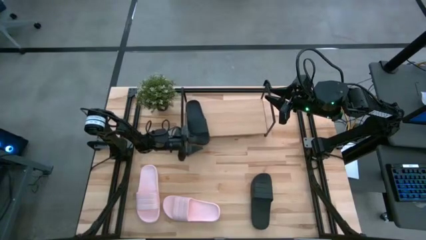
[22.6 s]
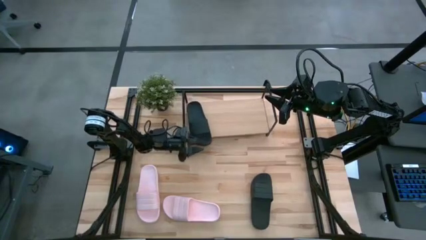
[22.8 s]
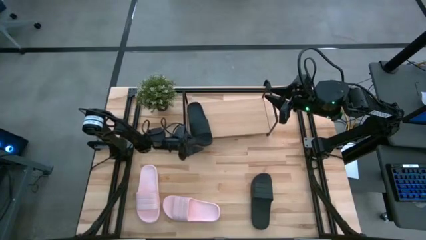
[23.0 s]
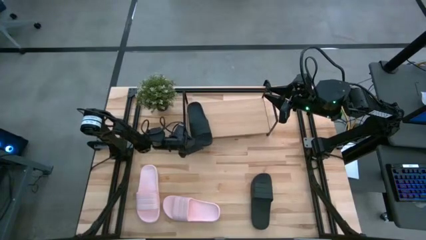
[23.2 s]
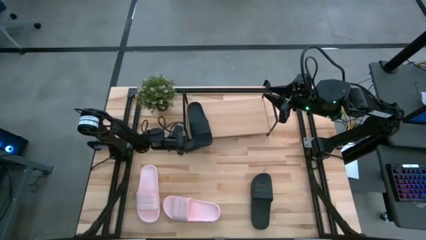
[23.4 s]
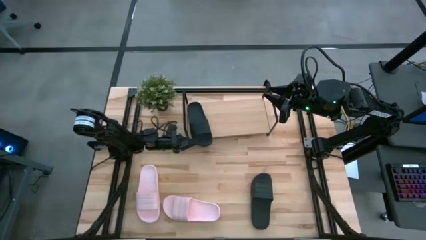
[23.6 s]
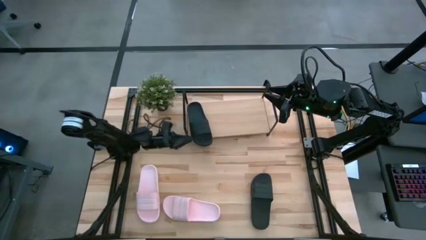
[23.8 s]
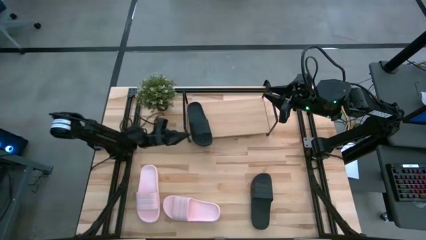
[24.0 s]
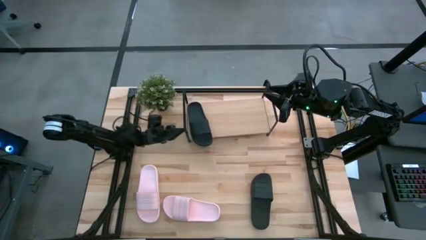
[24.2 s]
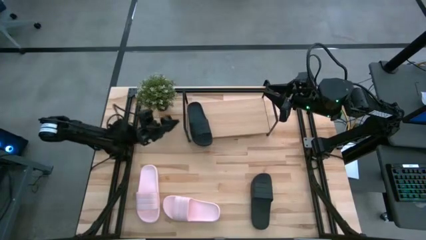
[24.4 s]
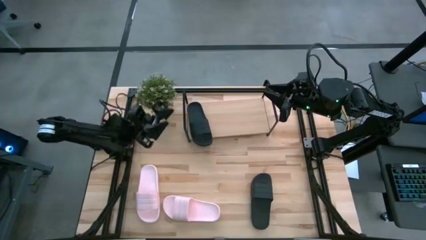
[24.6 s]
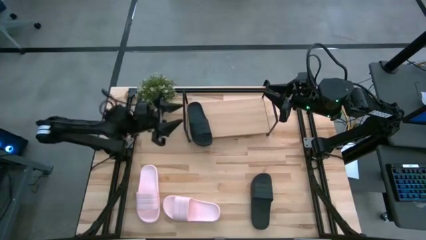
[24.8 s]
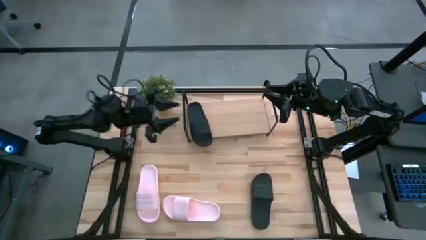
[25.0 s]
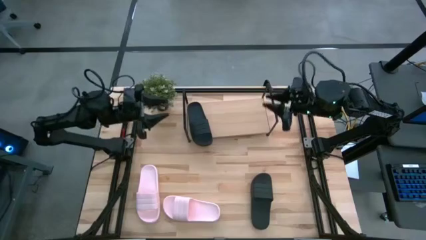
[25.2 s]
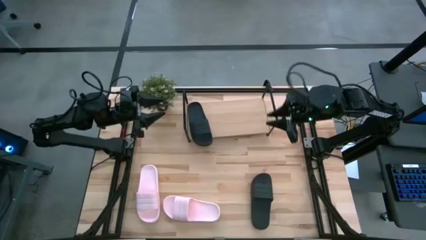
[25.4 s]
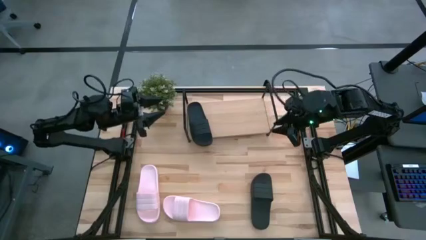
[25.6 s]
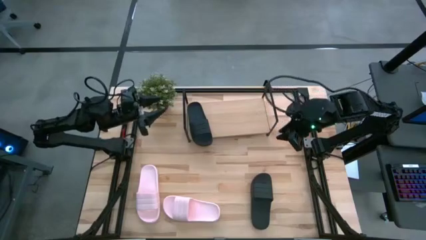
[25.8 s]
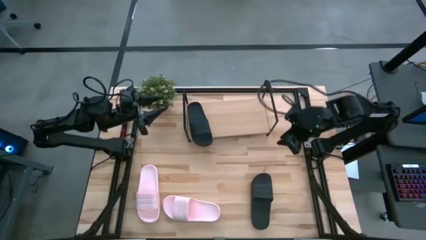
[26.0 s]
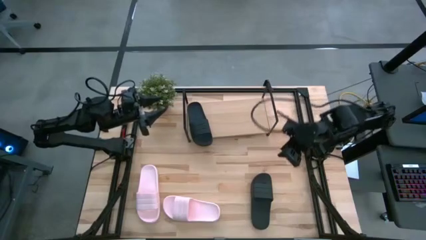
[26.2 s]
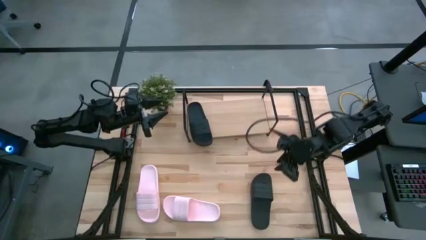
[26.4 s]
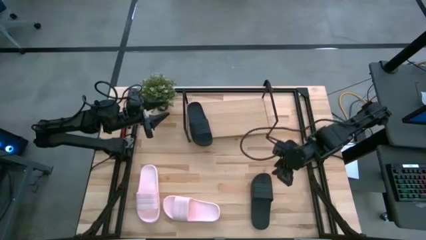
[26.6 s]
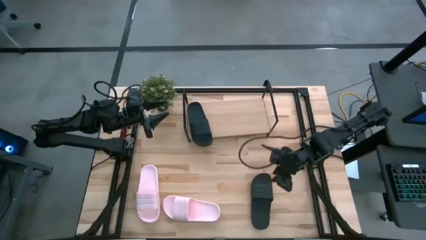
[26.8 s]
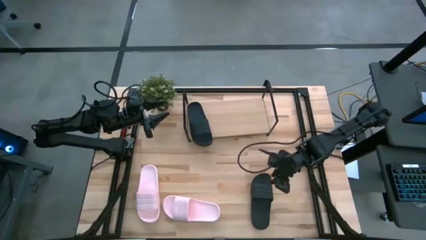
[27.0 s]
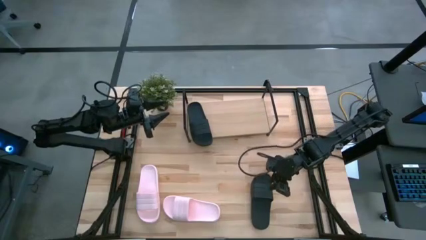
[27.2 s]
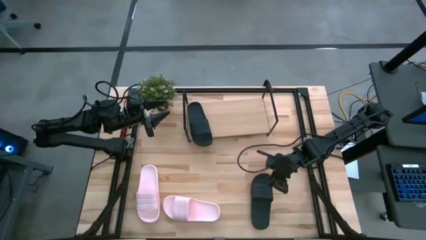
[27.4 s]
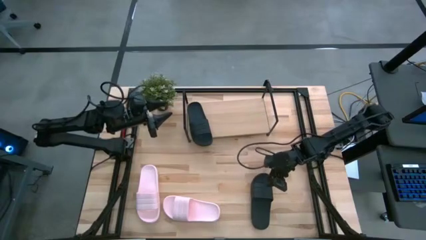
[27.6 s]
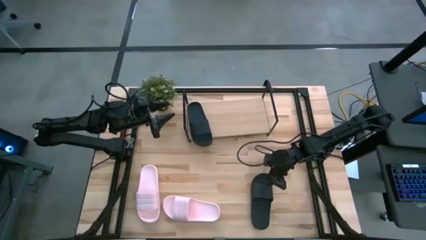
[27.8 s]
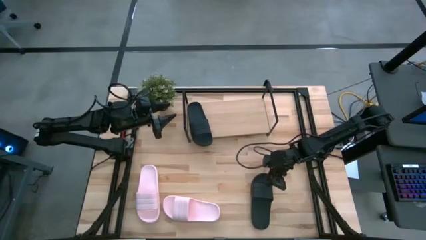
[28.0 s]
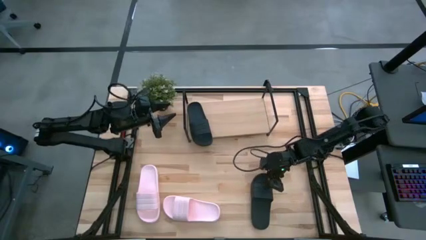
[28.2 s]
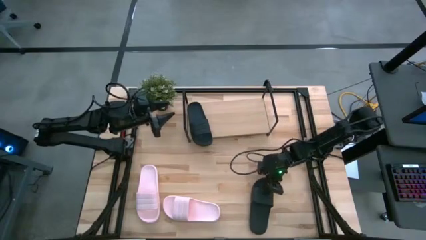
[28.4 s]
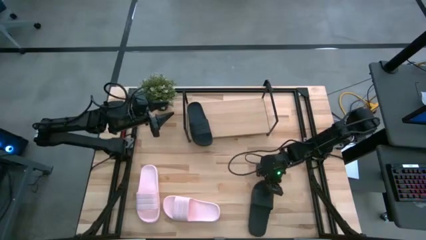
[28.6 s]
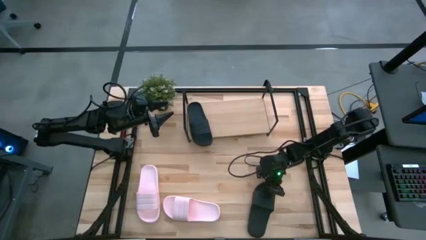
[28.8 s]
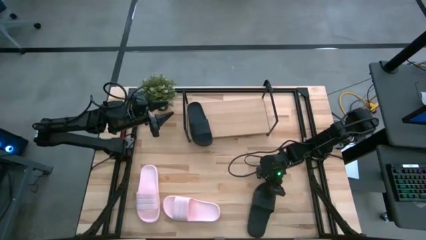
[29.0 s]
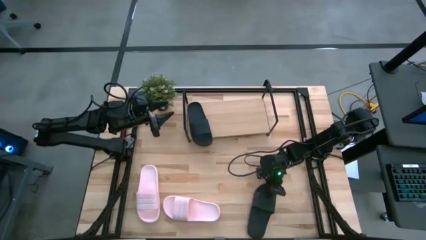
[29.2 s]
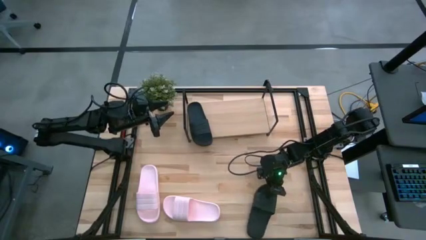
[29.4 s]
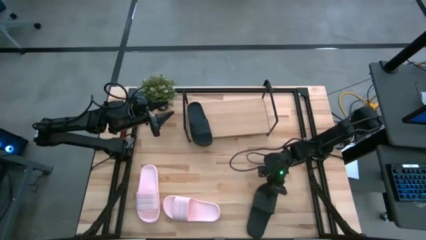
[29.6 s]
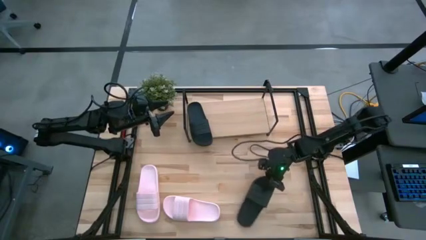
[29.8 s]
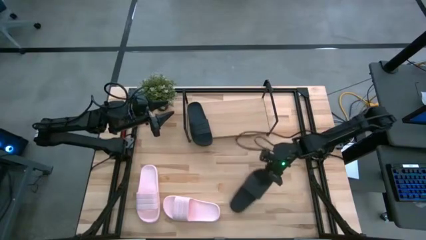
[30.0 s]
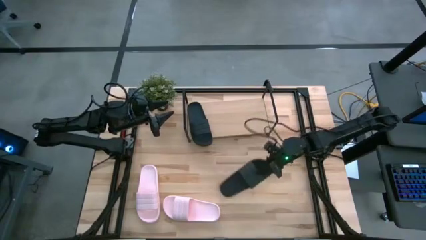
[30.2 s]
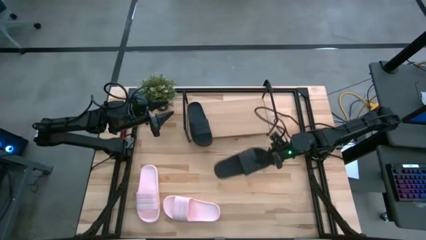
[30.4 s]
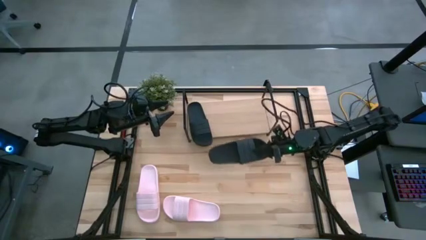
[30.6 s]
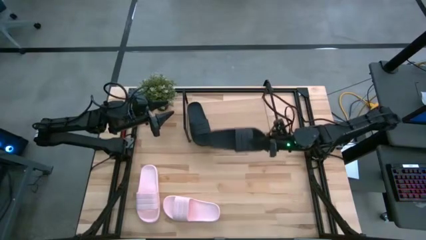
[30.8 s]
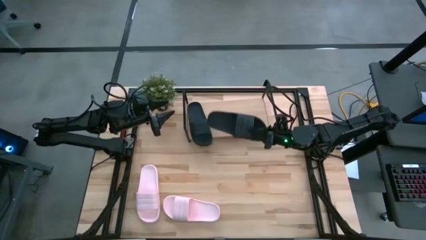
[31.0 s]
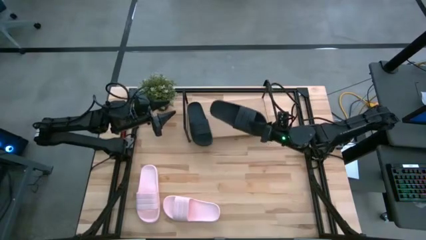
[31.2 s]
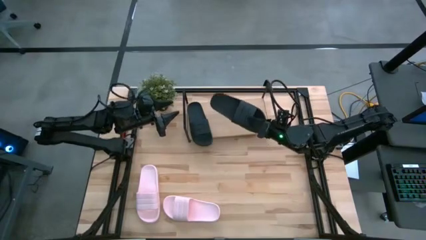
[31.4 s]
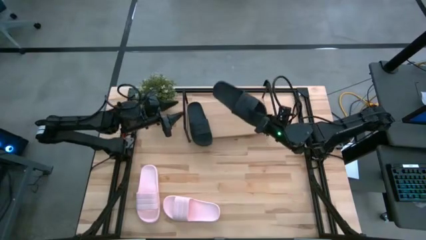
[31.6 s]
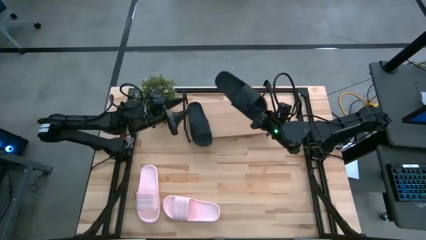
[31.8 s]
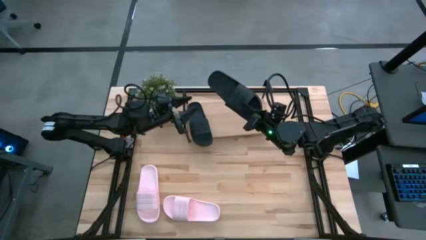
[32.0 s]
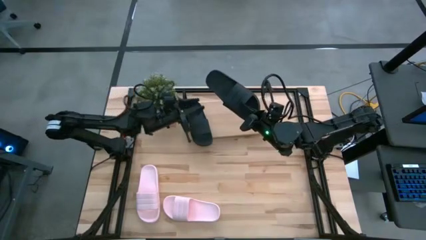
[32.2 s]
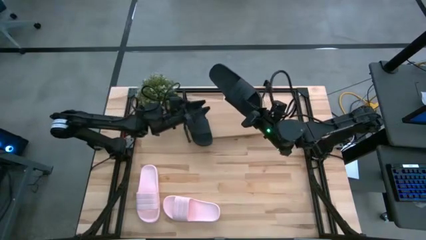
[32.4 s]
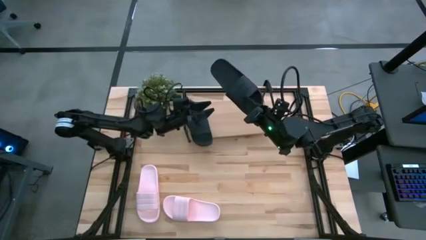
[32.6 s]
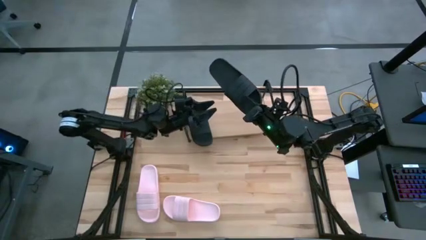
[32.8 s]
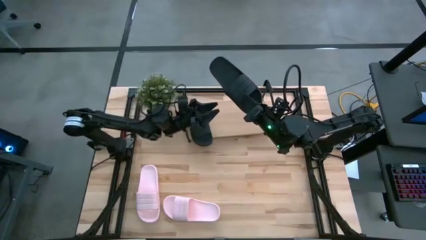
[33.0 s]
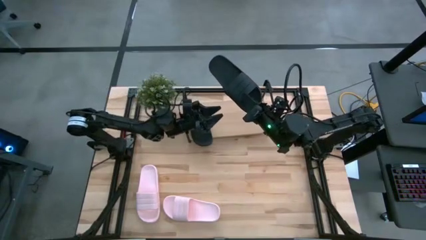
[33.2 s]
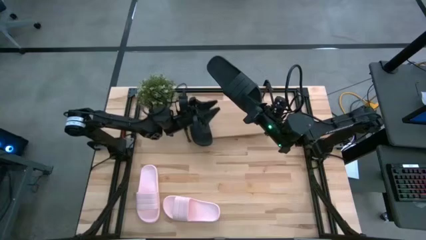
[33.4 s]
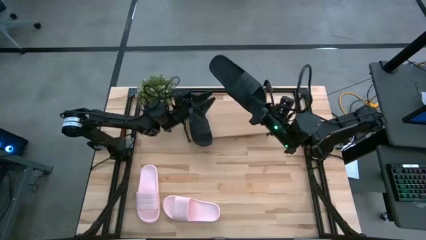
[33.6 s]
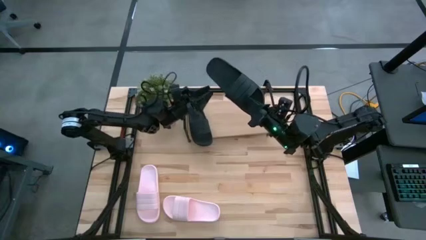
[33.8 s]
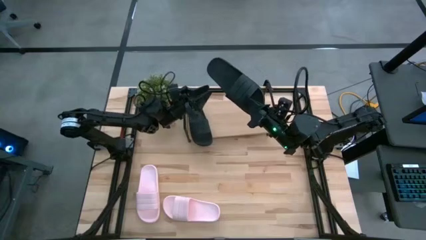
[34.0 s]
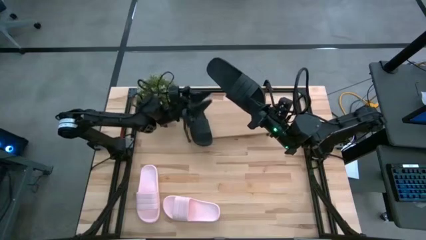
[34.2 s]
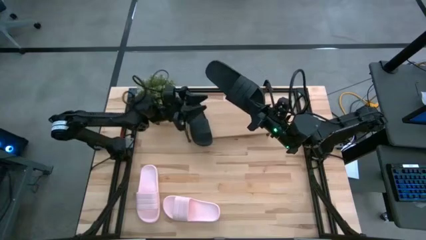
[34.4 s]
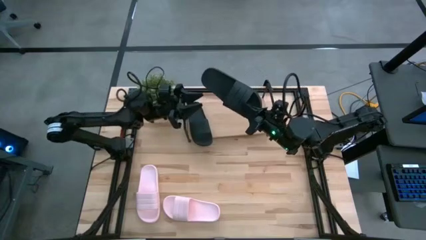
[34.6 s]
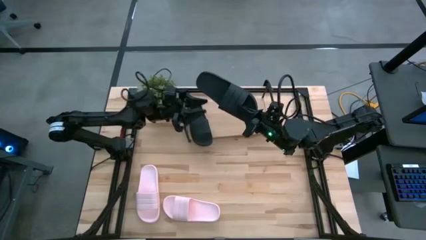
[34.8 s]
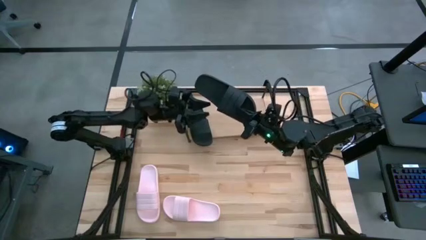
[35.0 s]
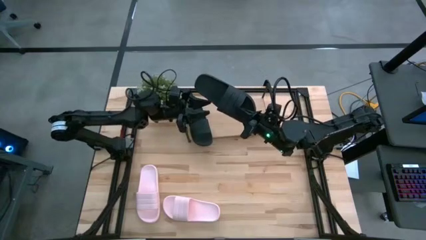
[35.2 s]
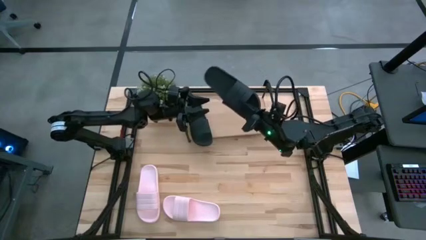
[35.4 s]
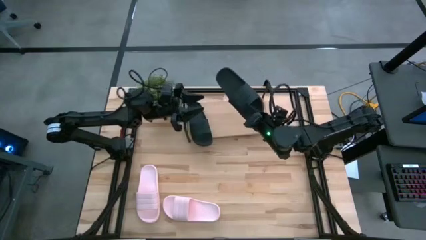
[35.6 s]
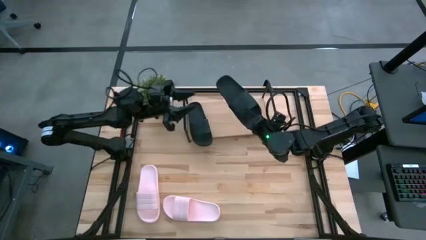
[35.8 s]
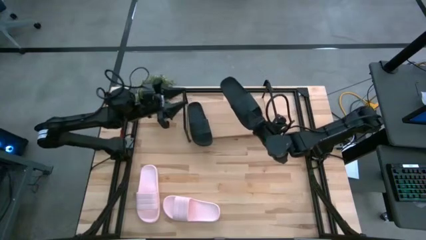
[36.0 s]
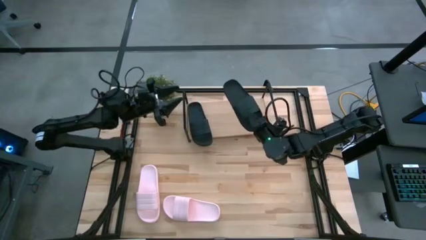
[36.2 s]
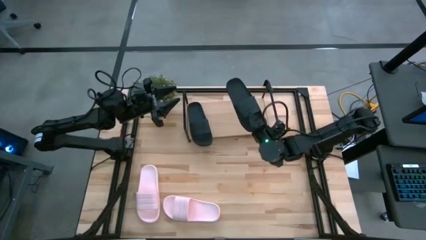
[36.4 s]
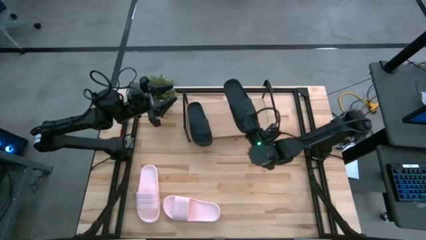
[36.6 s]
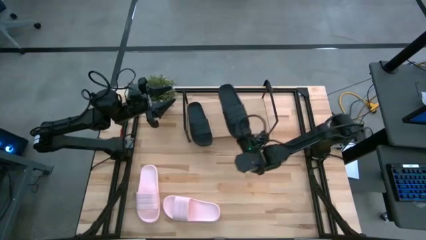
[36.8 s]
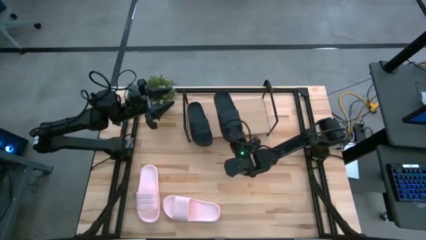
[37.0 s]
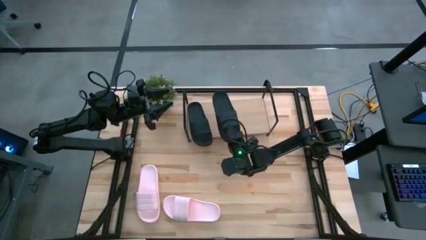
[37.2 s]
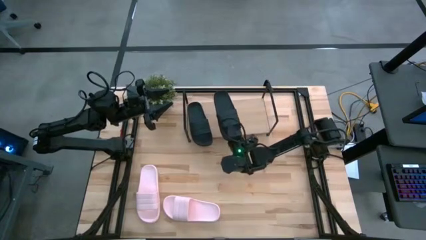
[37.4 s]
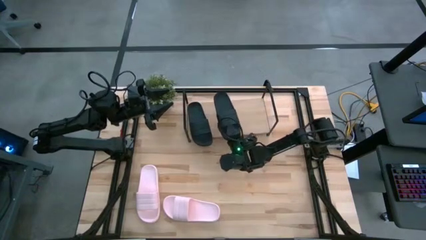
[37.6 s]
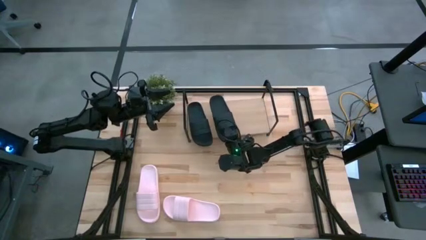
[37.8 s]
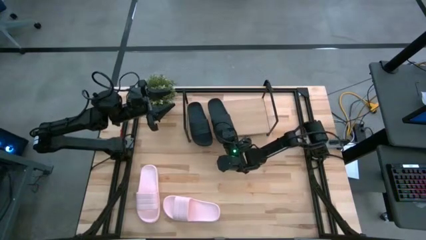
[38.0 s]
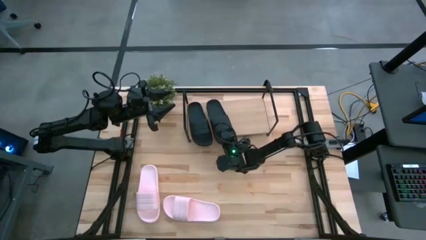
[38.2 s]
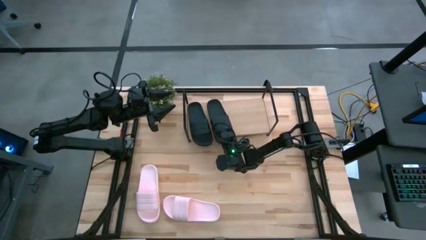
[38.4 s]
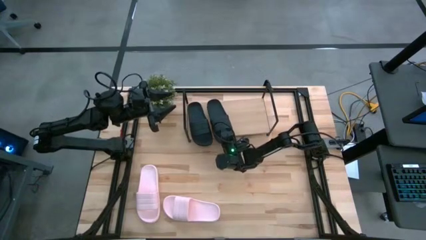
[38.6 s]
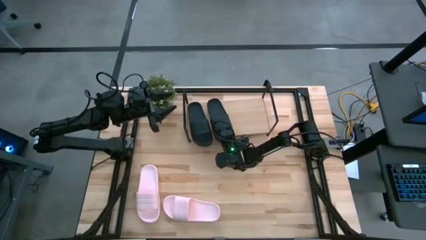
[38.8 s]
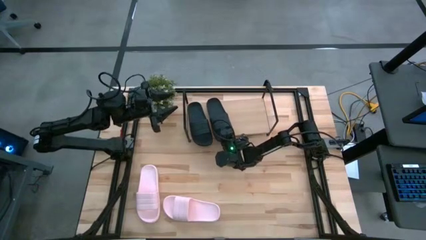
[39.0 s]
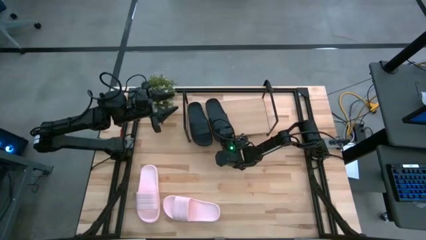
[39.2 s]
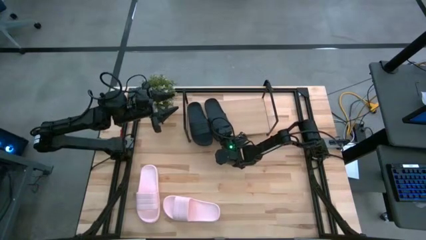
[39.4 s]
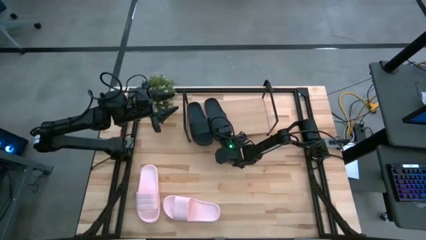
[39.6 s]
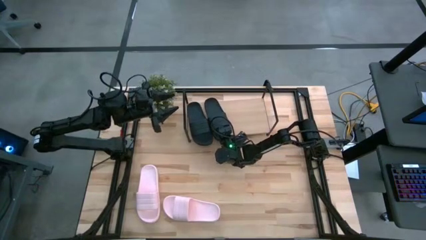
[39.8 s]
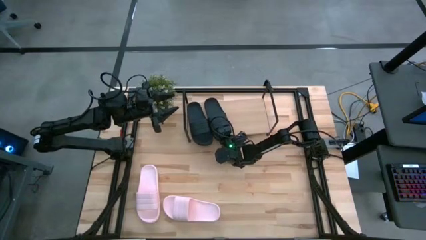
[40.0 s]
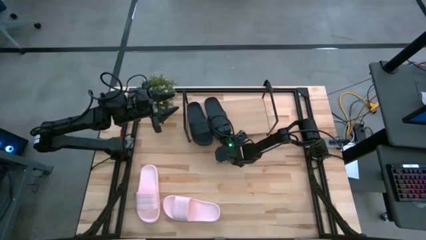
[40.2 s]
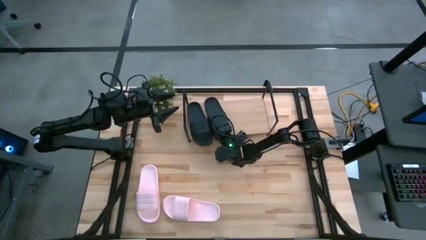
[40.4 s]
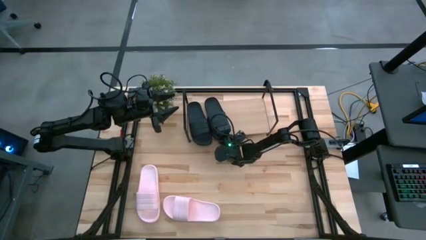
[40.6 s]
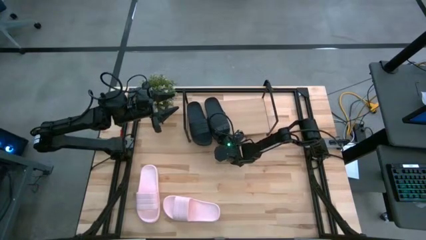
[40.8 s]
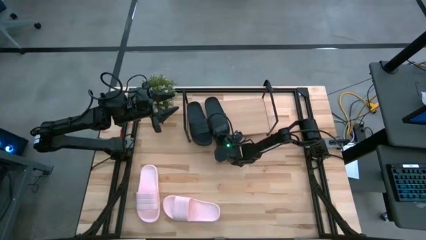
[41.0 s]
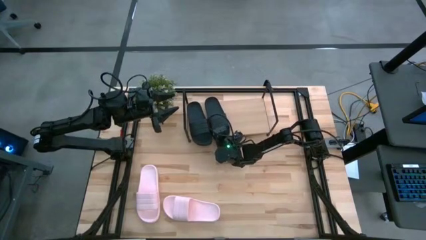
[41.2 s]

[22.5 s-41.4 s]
Task: Pick and place slides into the shelf
Put the black slipper on the shelf
